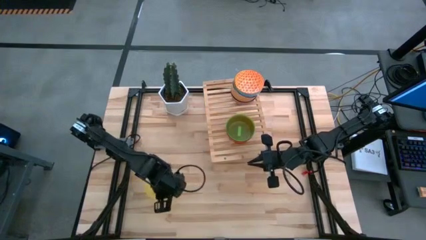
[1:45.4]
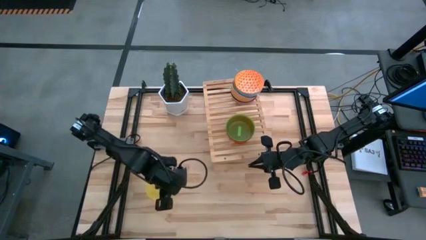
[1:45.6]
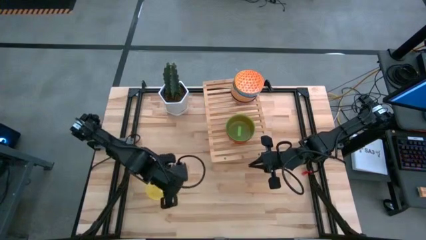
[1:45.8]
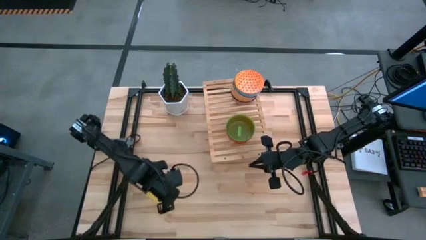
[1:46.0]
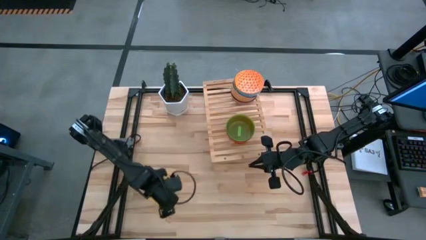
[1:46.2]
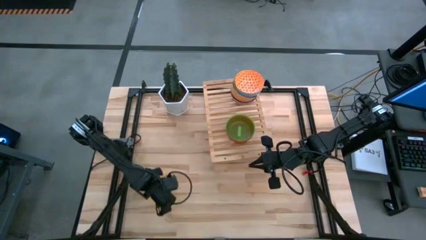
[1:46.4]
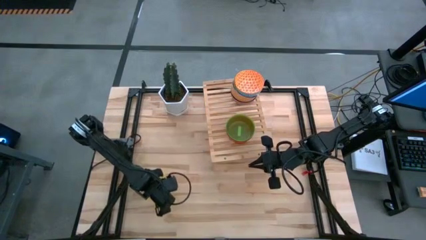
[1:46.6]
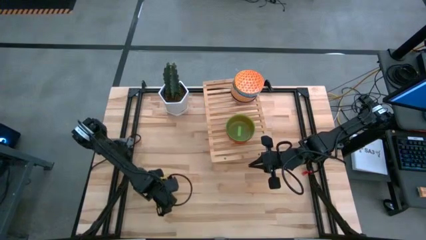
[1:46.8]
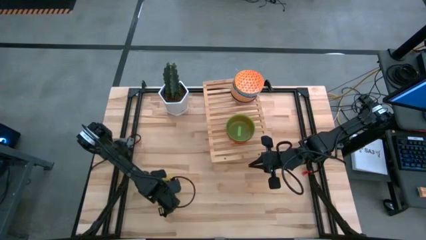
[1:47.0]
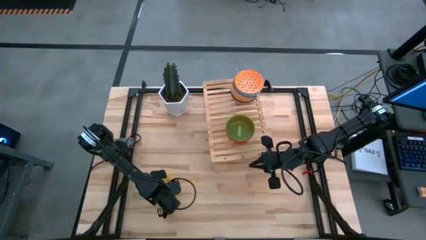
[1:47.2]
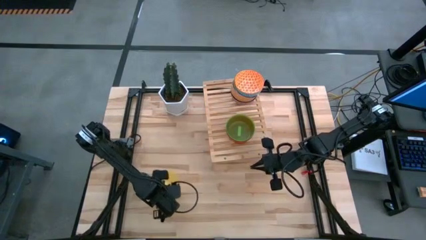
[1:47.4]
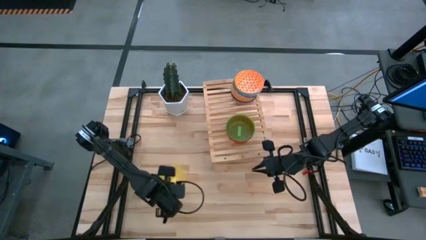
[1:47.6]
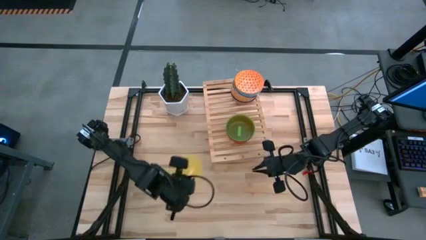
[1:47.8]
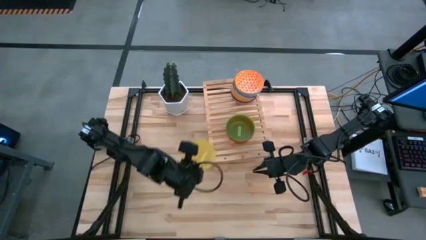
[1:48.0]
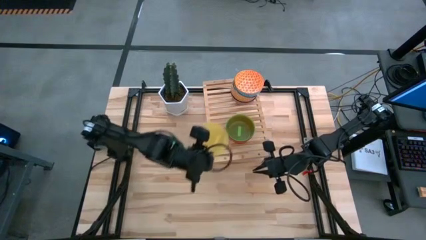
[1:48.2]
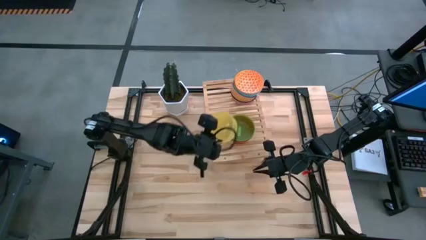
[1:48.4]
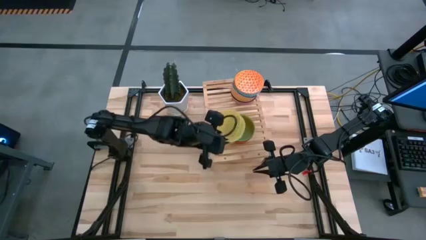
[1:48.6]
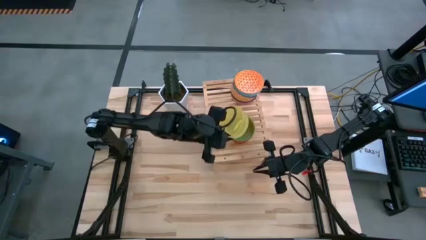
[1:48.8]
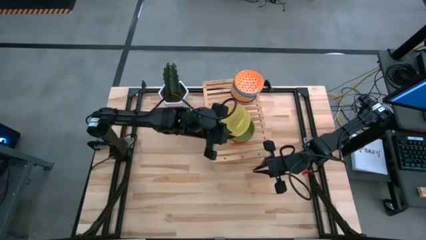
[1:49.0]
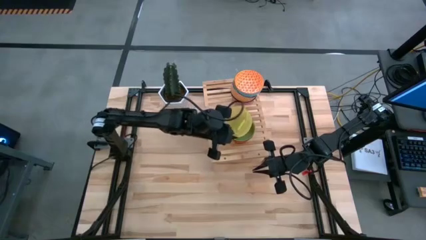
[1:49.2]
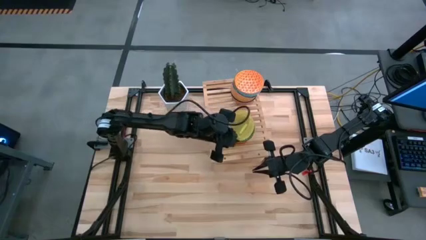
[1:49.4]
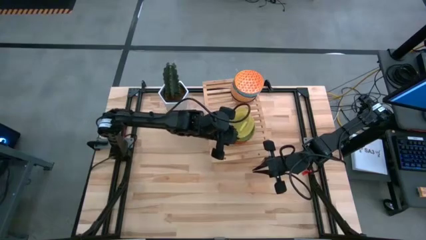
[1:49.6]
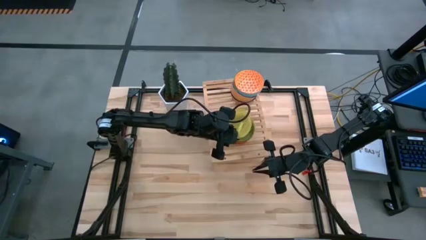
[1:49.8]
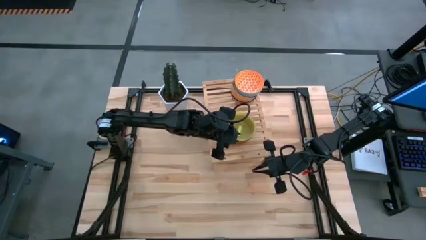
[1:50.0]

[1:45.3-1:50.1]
Task: Place and stack bowls onto a shelf
Stack the yellow bowl on top of the green bowl on the shelf

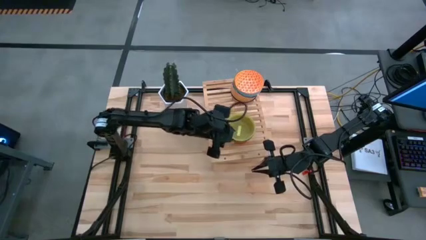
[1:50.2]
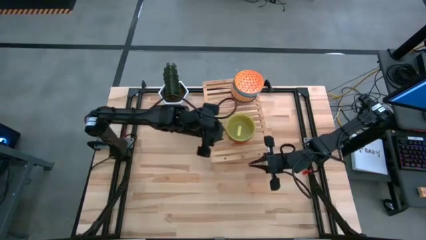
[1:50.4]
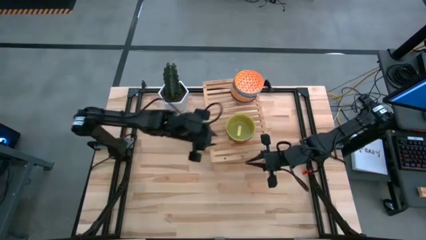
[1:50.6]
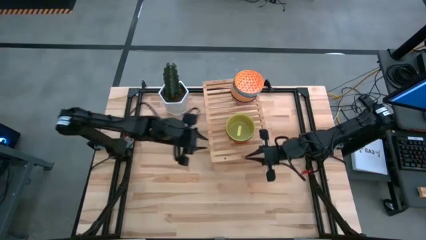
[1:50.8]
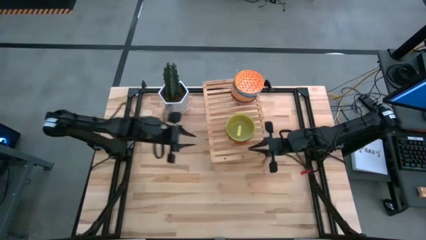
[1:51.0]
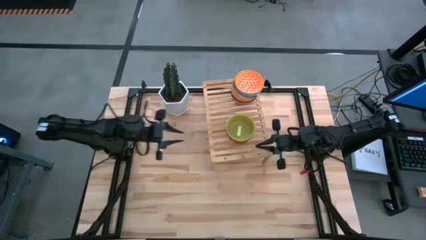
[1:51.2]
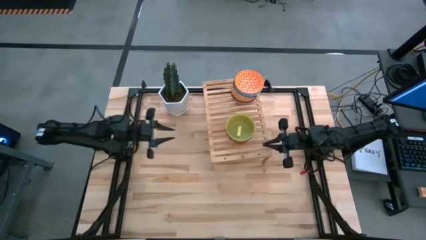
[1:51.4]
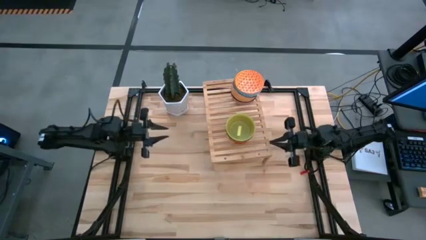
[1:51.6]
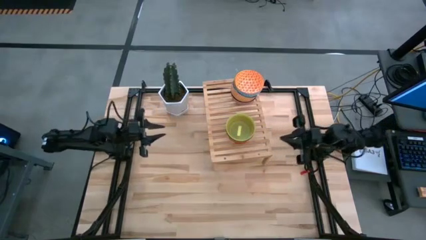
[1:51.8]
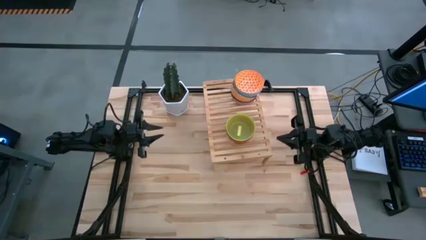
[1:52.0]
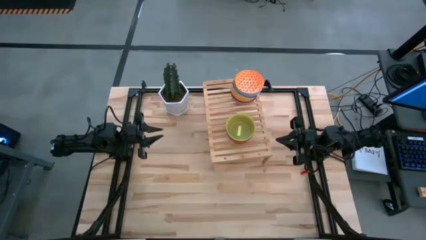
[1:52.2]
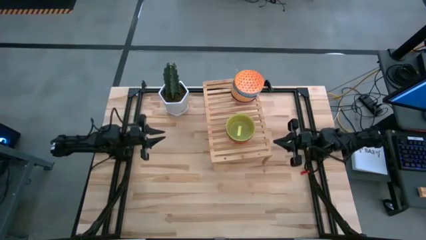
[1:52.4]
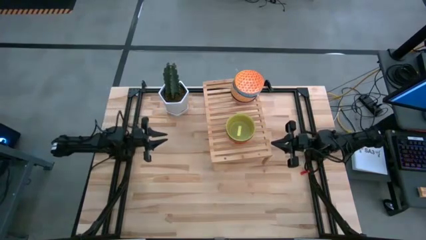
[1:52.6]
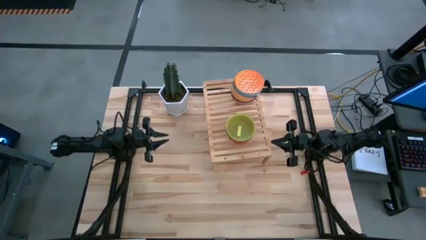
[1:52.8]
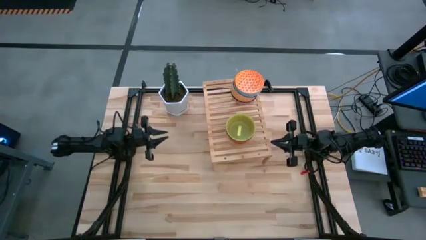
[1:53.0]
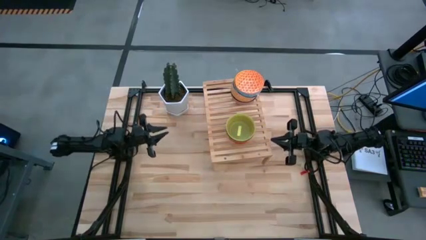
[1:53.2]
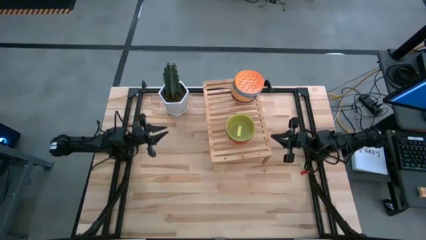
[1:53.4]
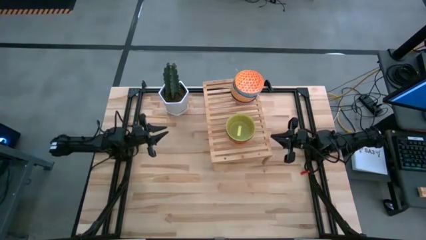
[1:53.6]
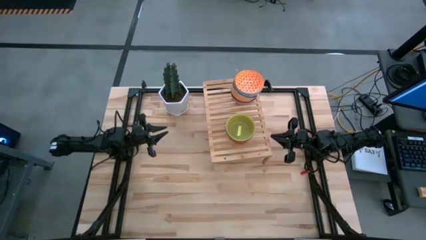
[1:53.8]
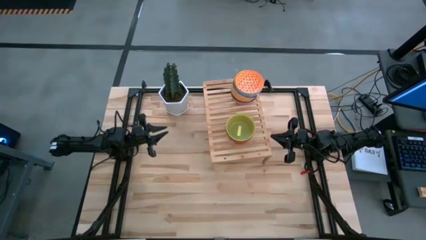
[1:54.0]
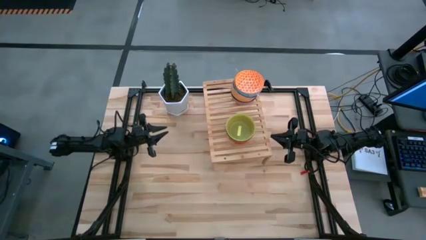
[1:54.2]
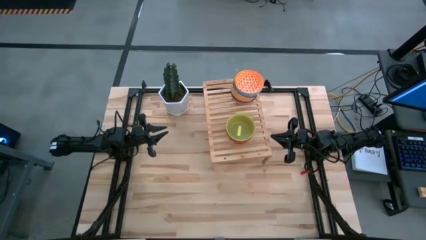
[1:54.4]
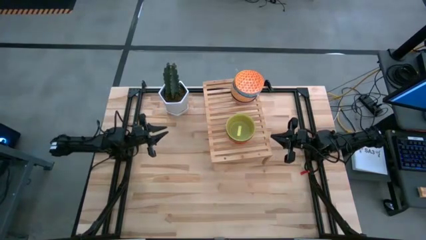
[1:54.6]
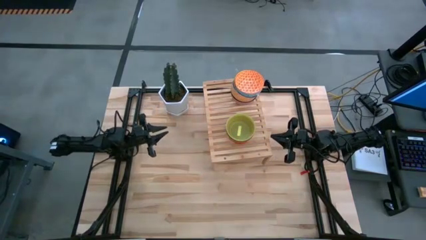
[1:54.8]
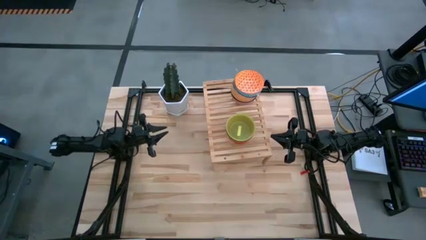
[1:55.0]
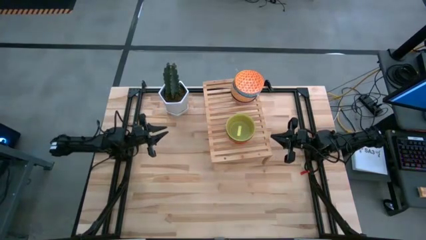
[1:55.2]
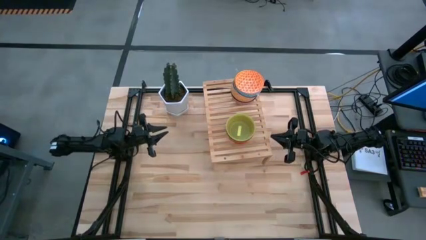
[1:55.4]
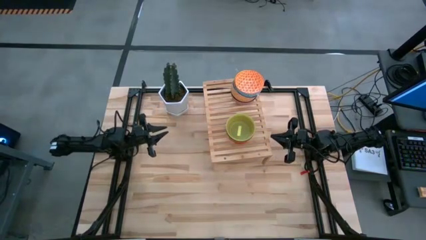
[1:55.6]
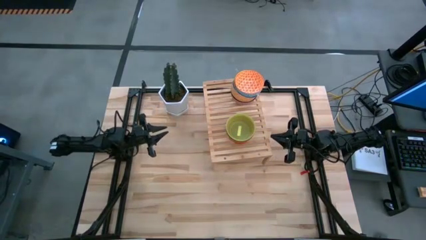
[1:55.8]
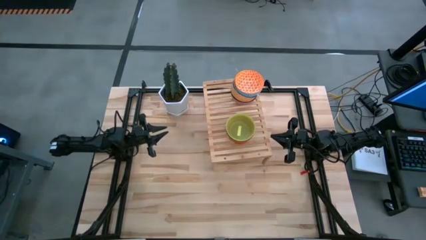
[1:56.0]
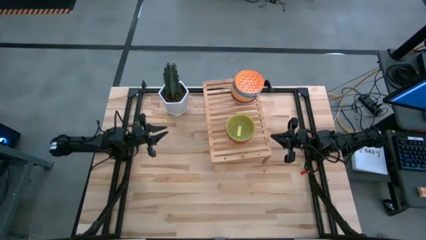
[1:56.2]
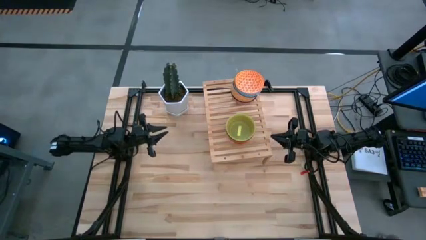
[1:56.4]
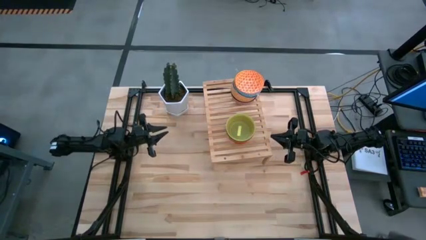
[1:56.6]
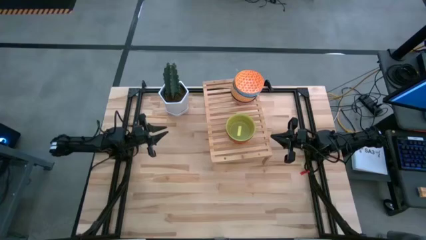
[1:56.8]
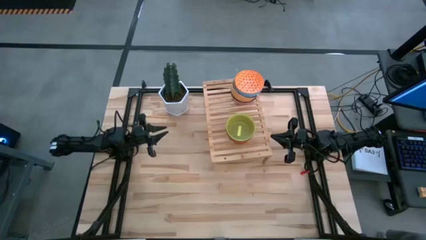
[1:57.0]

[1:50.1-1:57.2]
Return to Home Position
